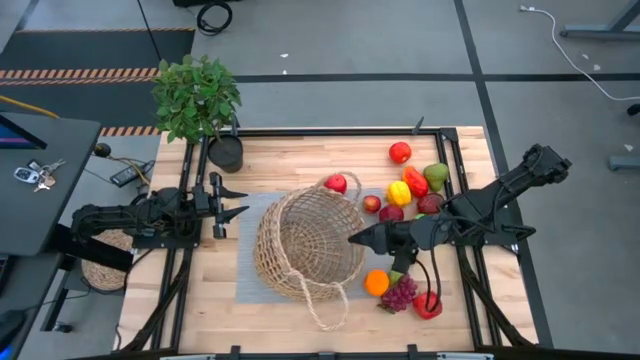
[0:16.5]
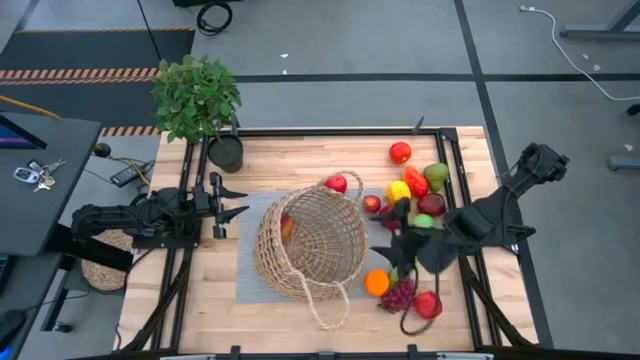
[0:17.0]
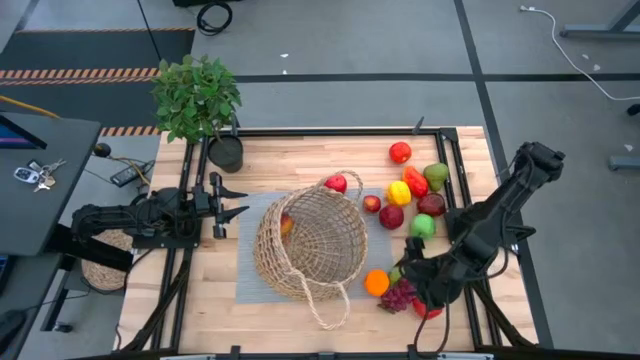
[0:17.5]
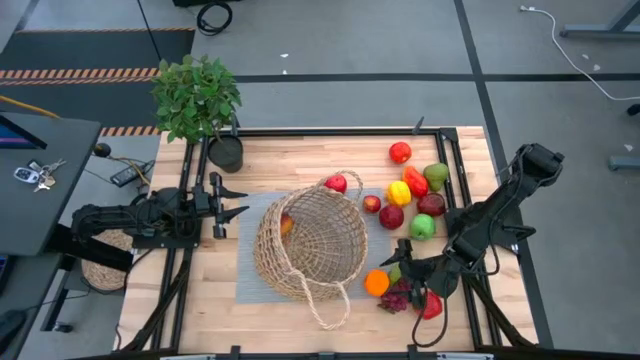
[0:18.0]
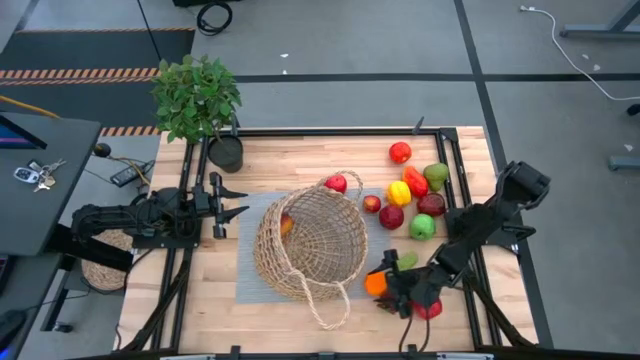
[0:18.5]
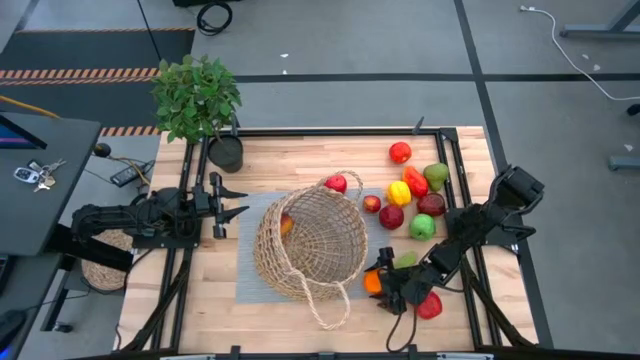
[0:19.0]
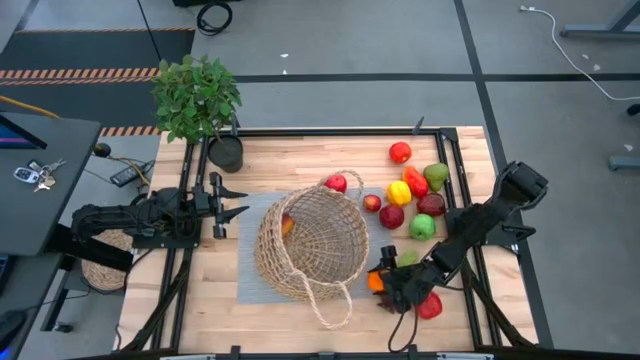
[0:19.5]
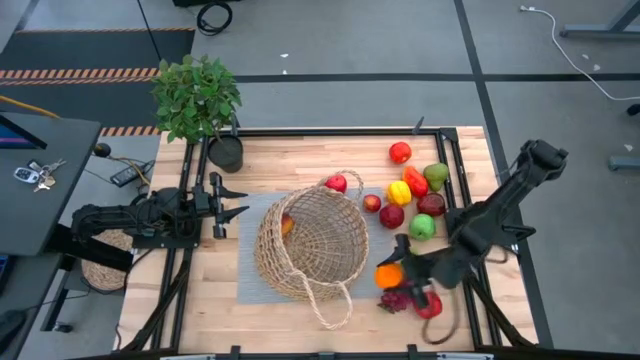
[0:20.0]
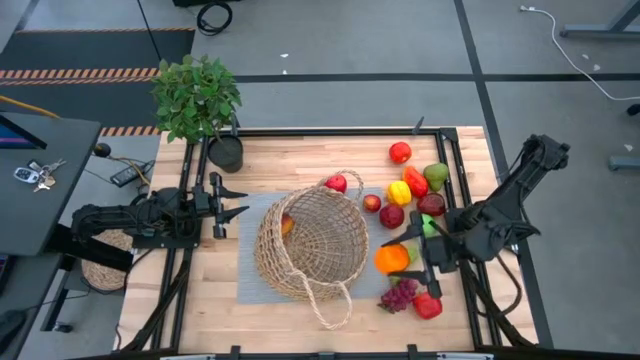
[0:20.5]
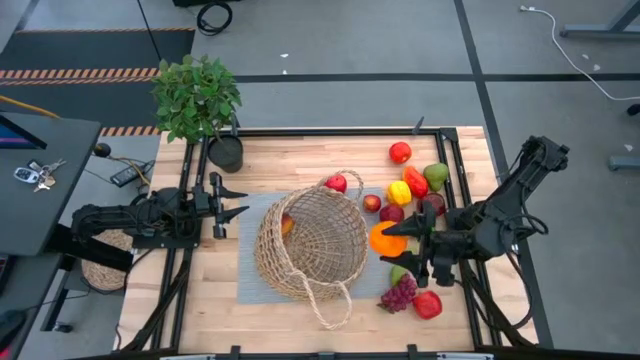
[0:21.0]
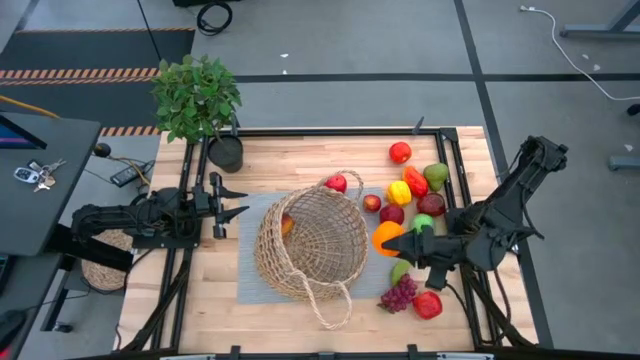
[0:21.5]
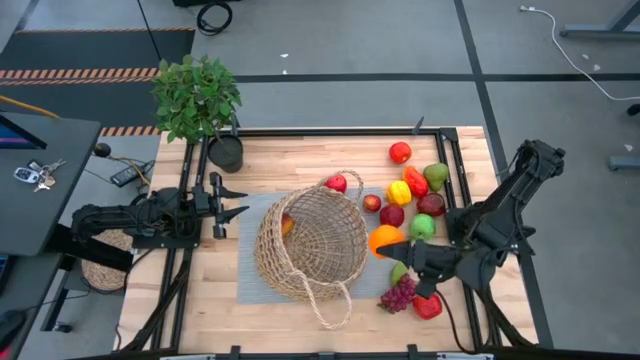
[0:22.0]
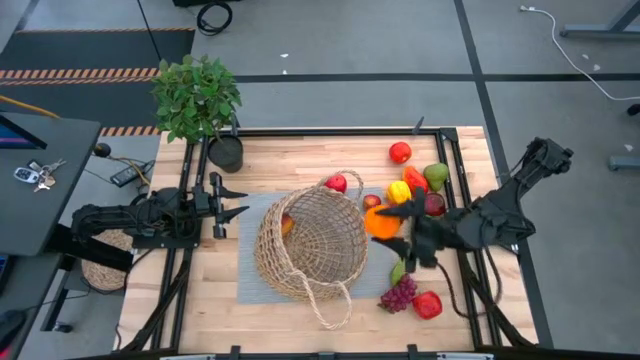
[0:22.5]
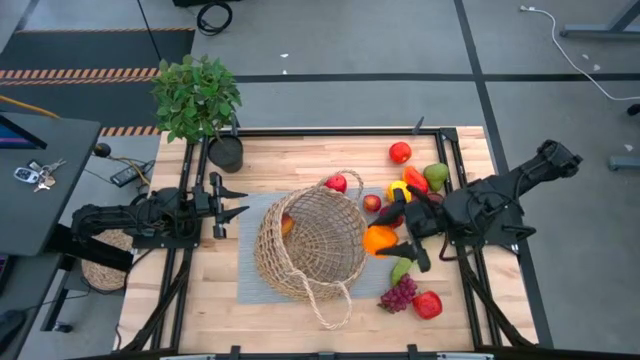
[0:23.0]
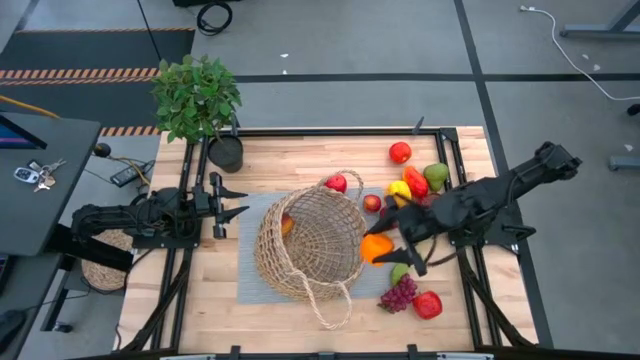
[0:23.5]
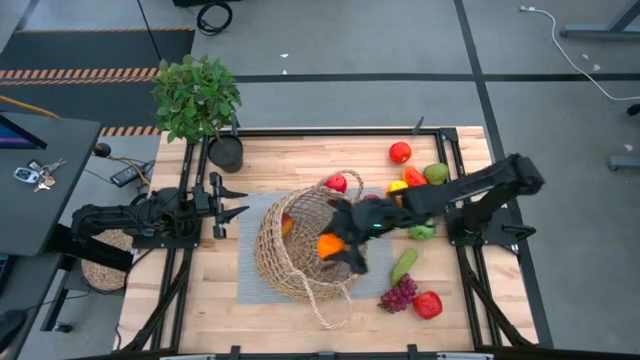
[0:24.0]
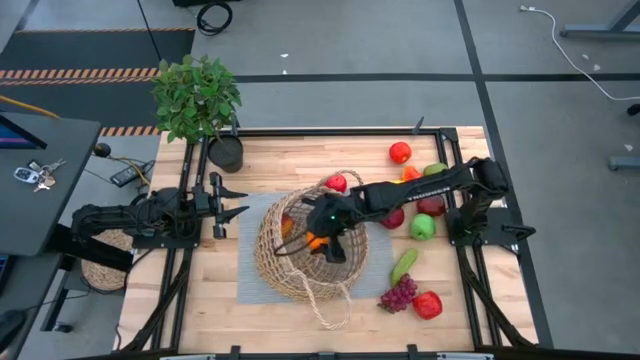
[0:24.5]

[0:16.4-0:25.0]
Task: Build produce basket
Put the orange into the brown basket

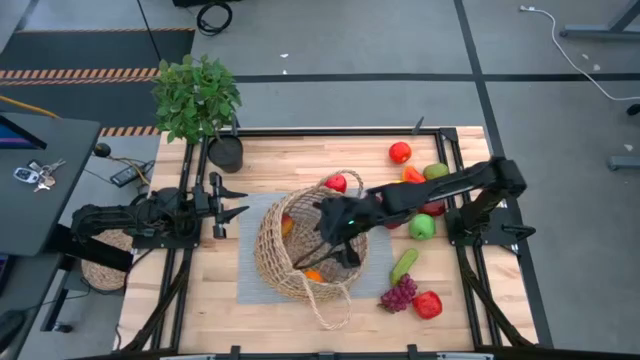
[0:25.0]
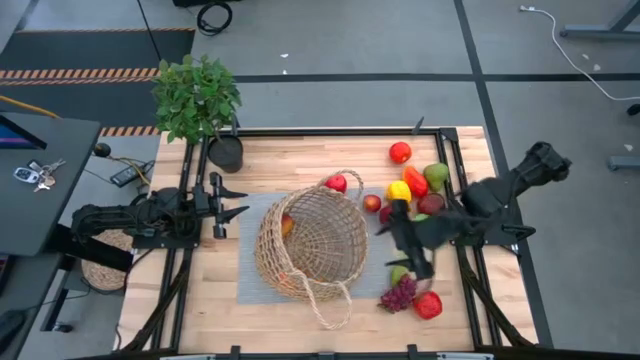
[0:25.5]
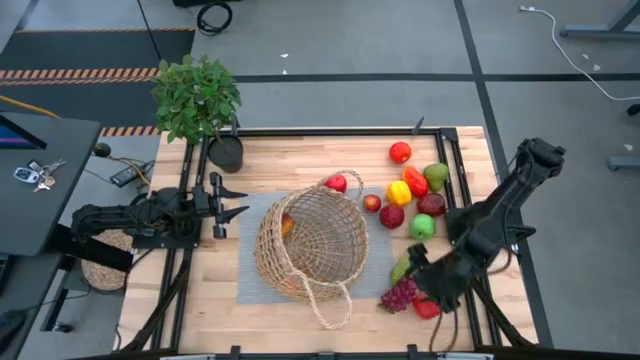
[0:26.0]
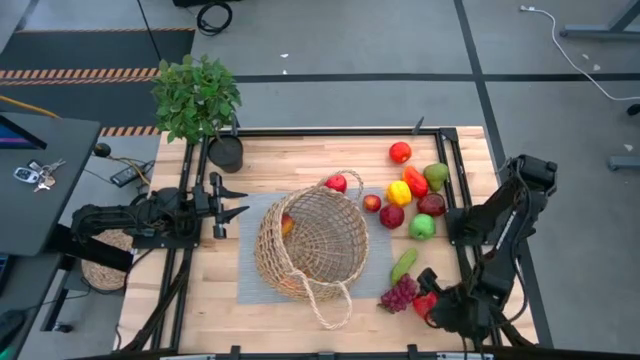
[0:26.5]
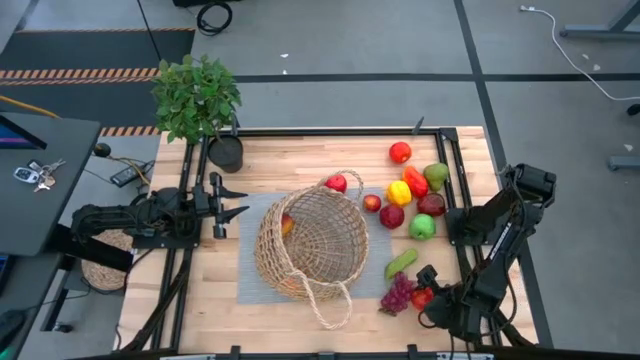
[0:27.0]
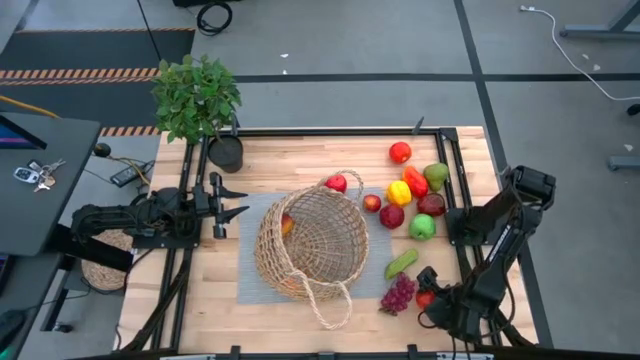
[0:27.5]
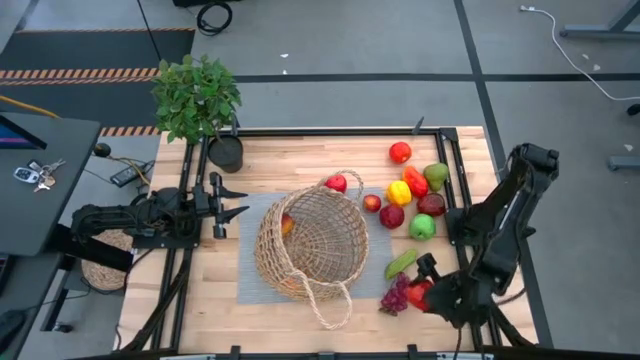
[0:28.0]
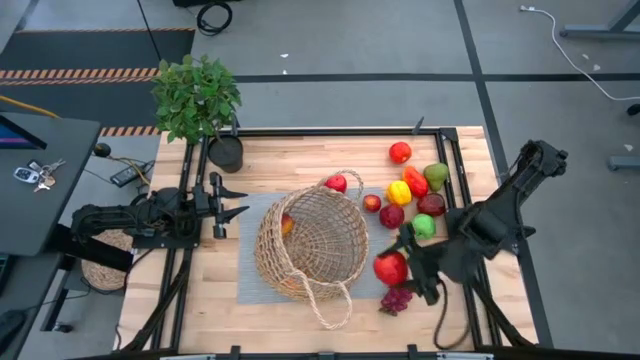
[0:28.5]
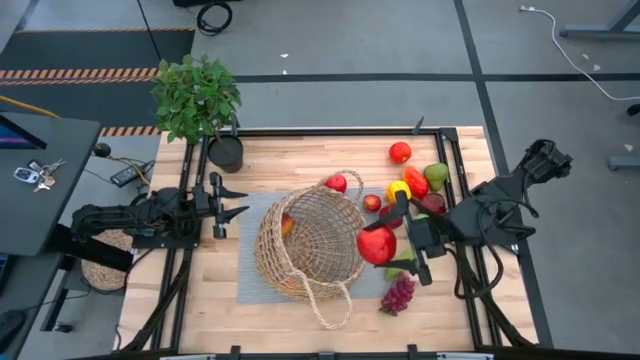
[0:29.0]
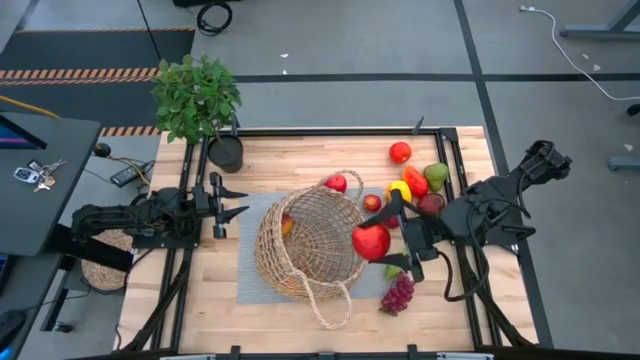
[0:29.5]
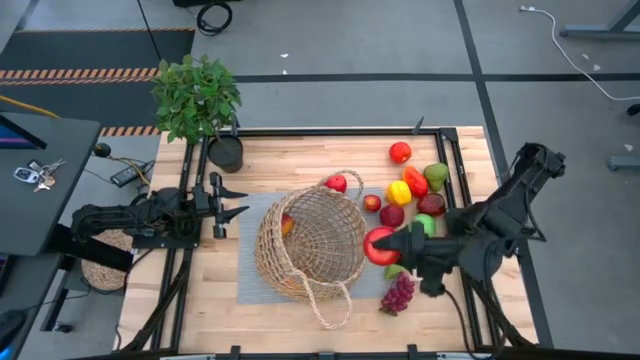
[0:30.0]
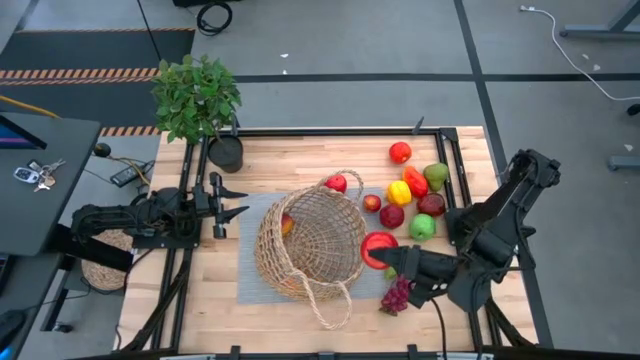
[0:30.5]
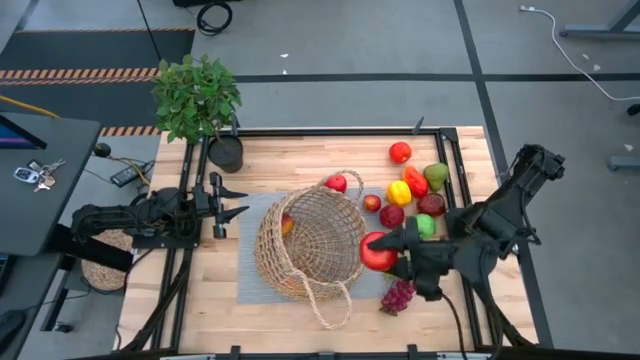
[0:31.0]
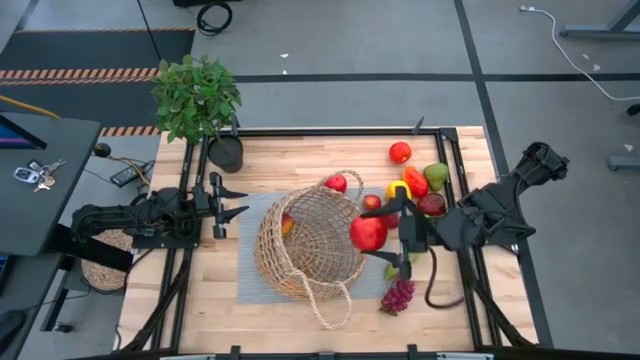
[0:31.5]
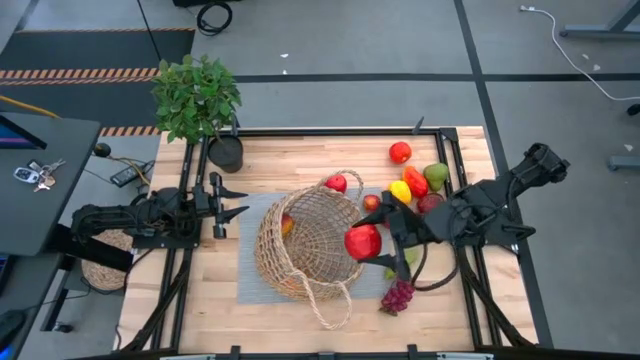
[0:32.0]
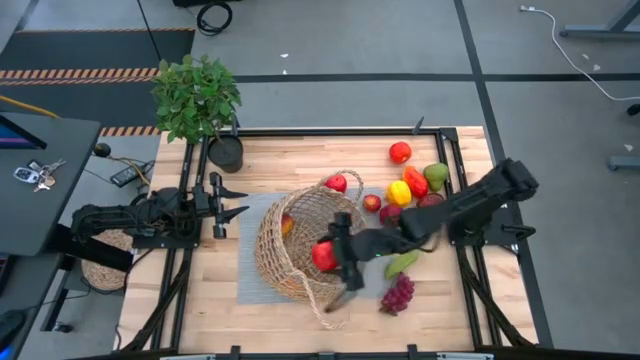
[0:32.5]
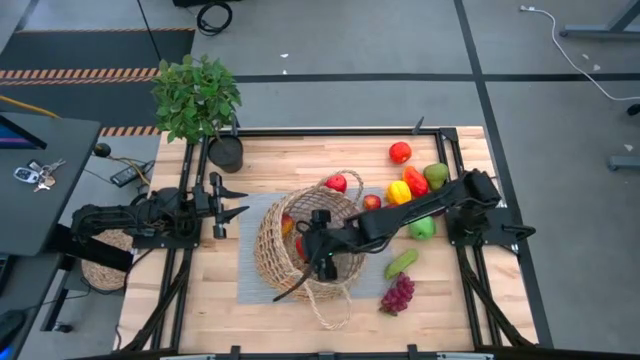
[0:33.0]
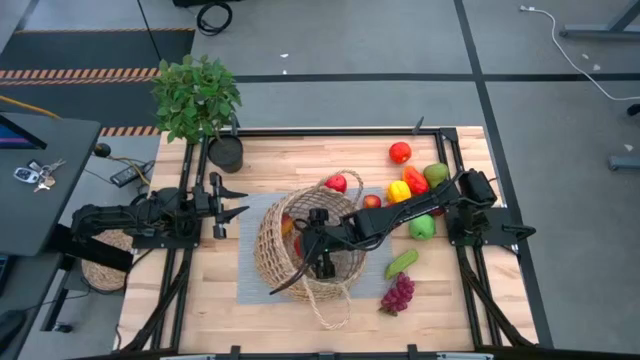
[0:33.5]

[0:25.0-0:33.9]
Put the red apple into the brown basket

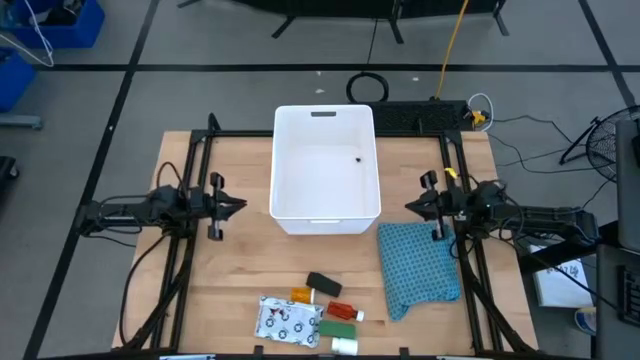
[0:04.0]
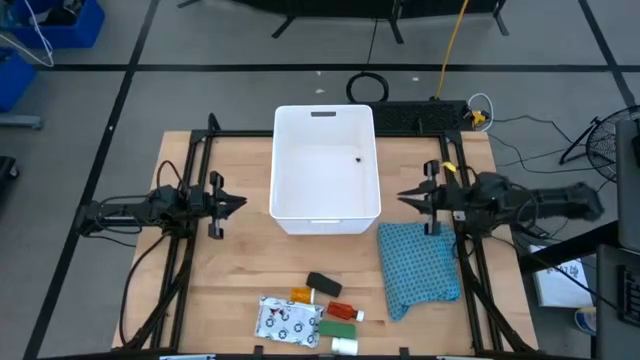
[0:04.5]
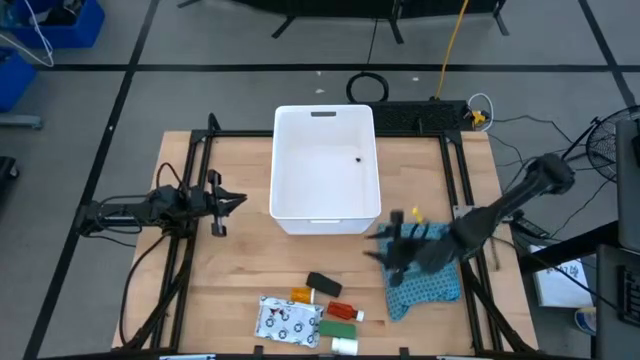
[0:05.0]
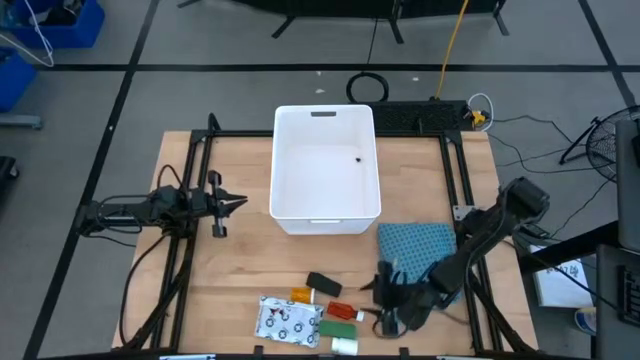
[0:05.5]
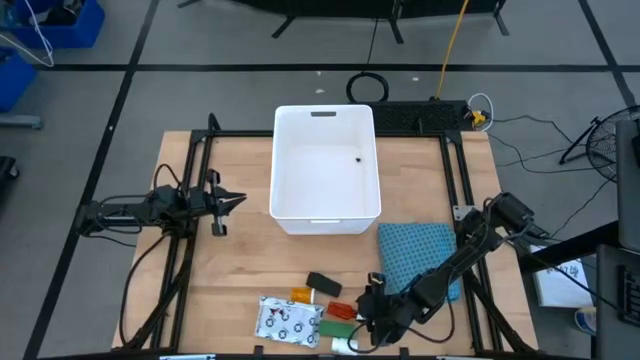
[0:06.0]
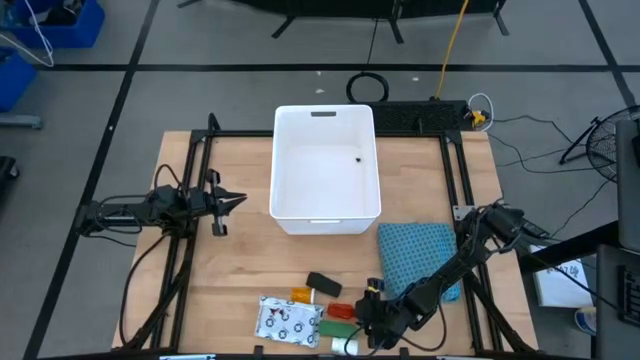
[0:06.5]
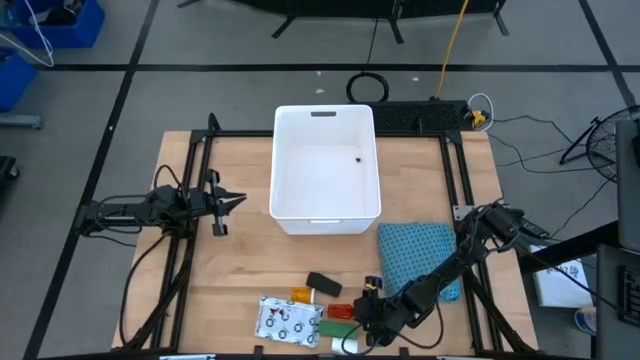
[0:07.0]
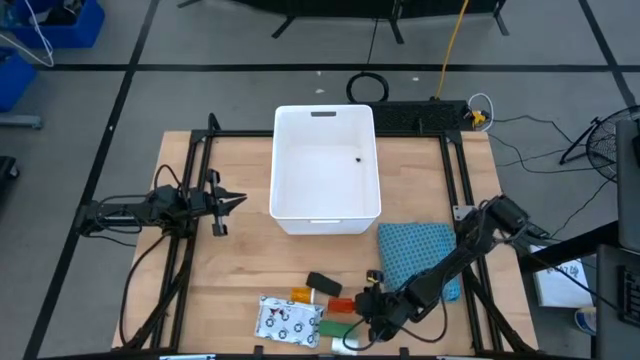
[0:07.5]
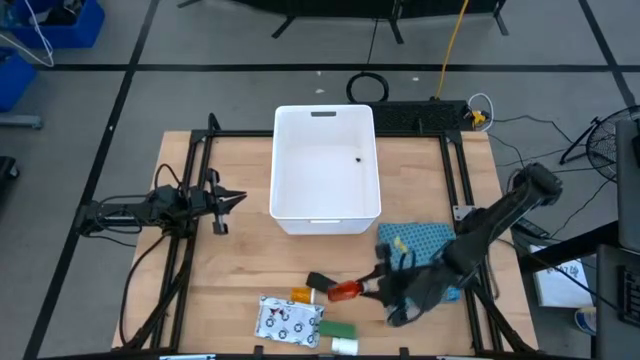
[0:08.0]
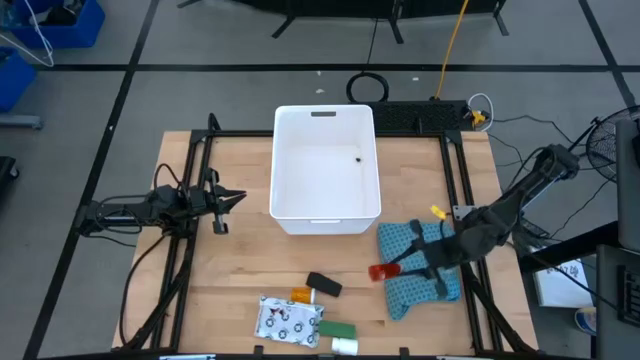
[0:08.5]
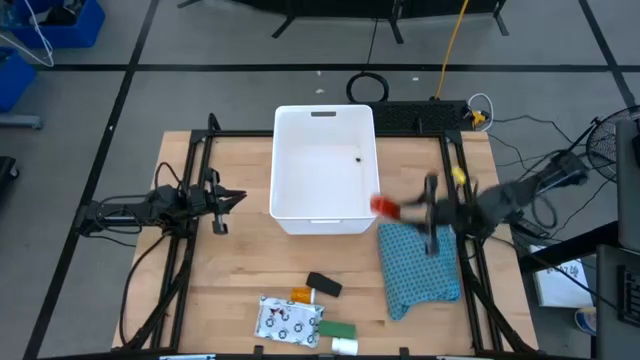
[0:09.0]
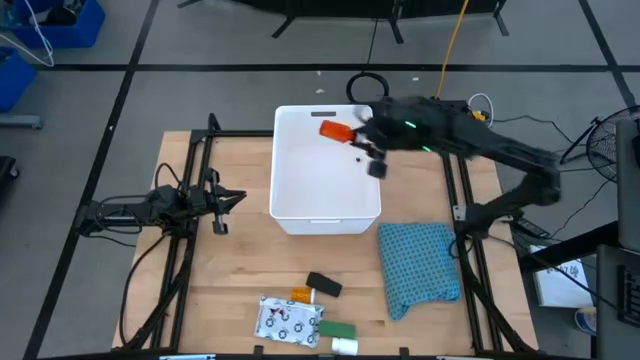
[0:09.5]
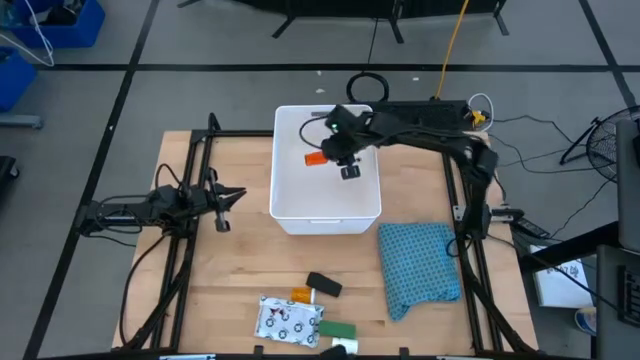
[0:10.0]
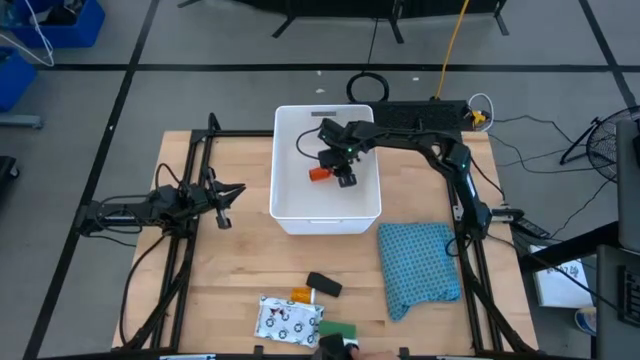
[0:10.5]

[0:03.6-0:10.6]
Task: Pick & place medical supplies in basket/bin
Put the red pill bottle into the bin
